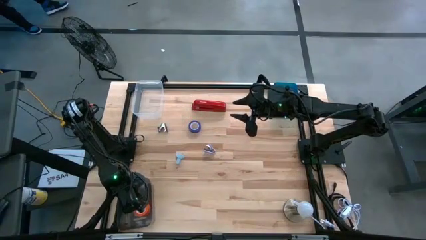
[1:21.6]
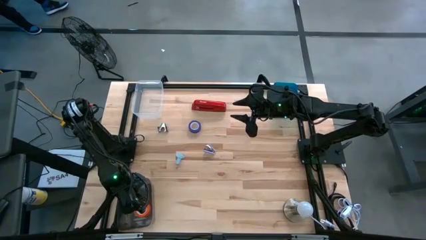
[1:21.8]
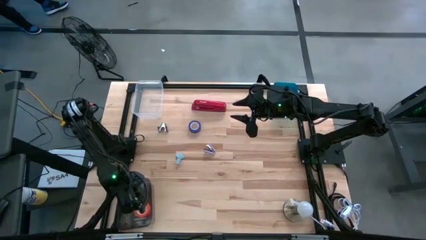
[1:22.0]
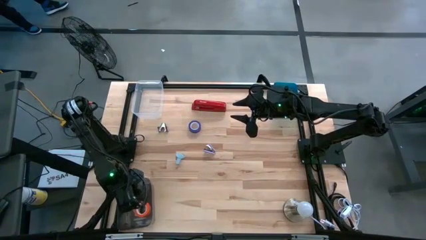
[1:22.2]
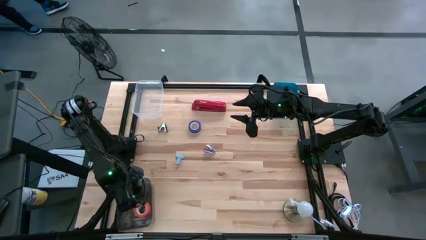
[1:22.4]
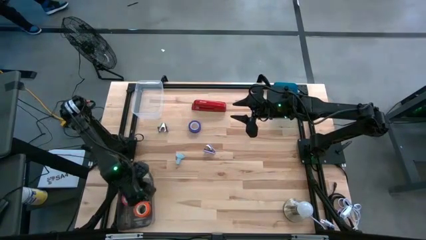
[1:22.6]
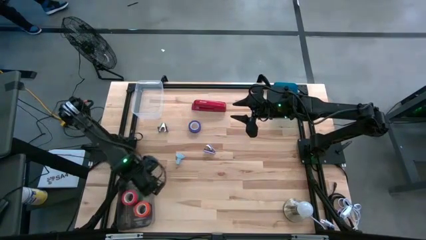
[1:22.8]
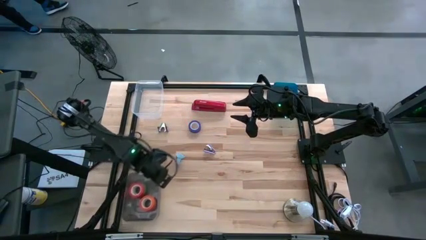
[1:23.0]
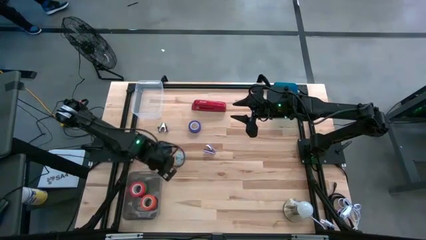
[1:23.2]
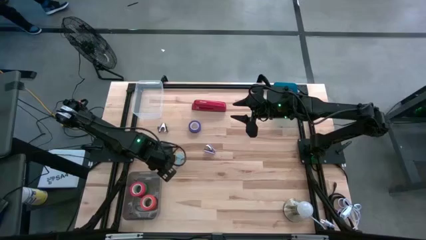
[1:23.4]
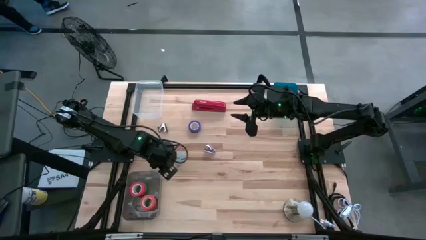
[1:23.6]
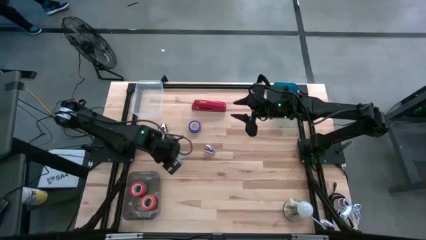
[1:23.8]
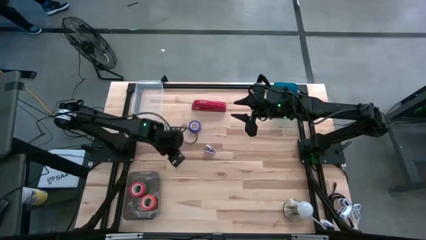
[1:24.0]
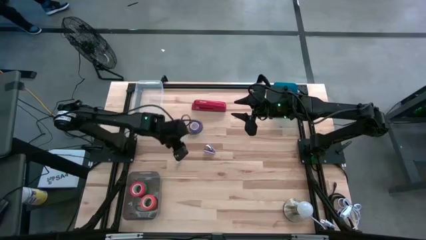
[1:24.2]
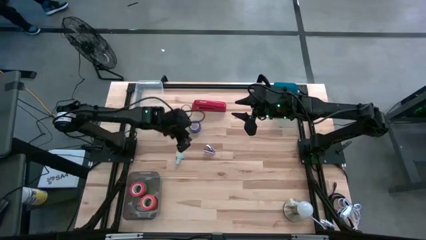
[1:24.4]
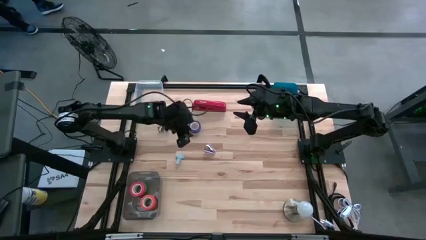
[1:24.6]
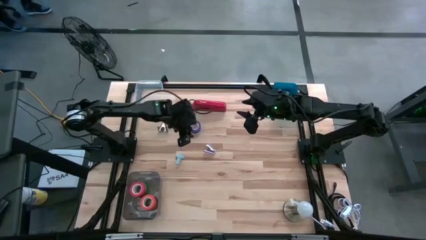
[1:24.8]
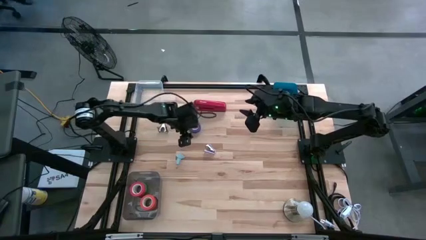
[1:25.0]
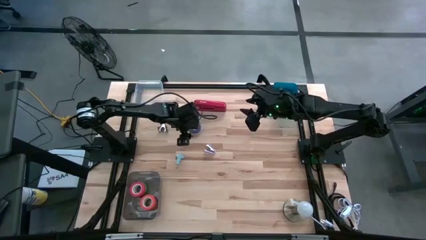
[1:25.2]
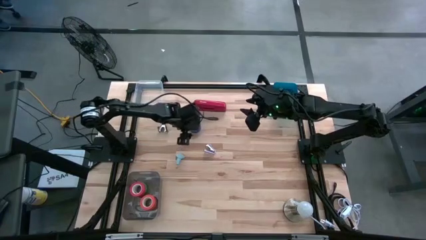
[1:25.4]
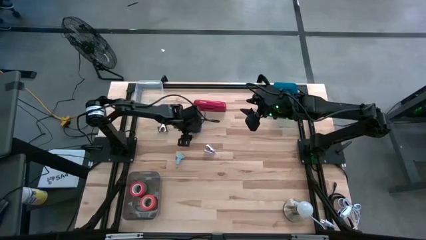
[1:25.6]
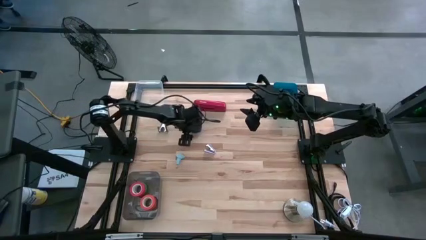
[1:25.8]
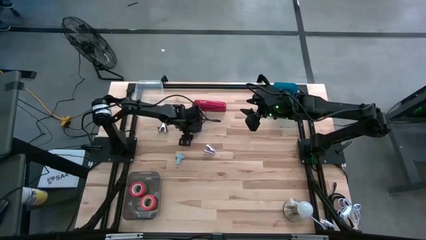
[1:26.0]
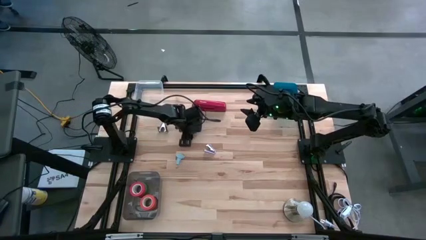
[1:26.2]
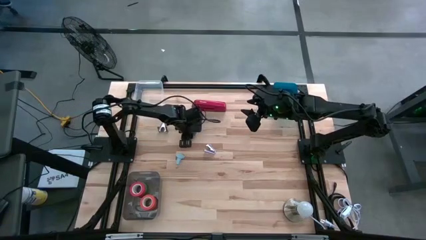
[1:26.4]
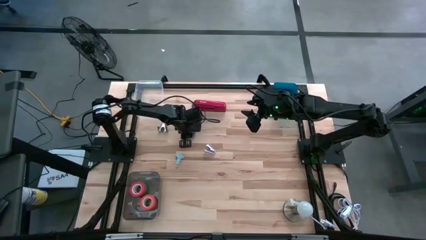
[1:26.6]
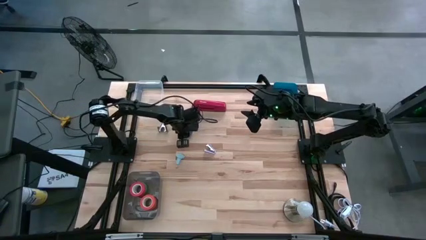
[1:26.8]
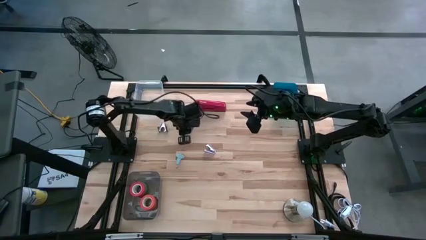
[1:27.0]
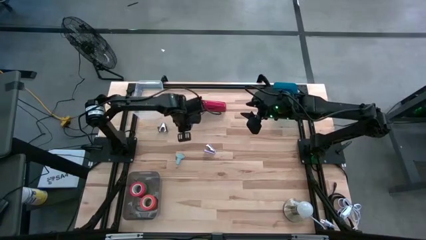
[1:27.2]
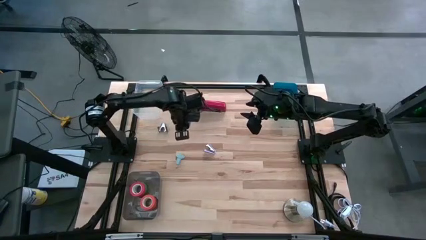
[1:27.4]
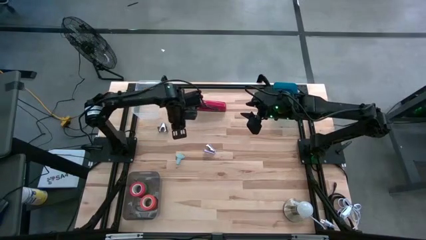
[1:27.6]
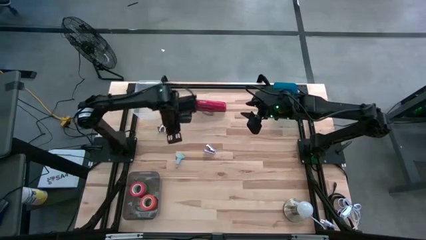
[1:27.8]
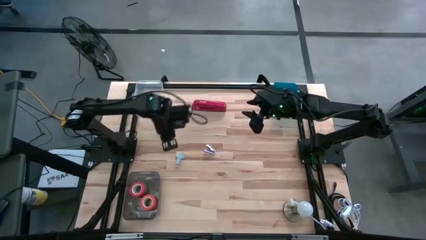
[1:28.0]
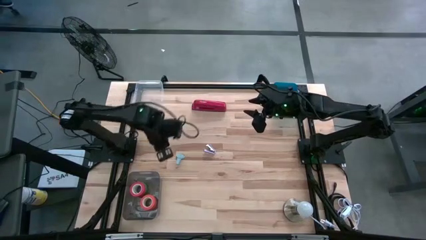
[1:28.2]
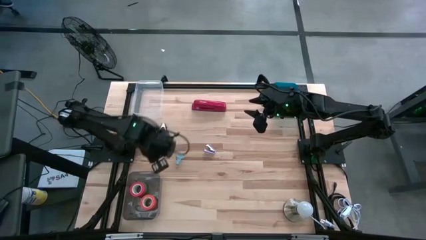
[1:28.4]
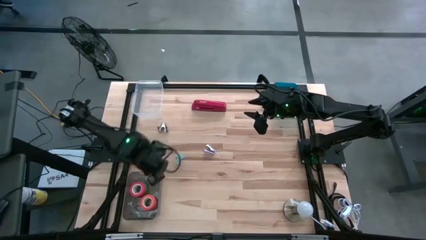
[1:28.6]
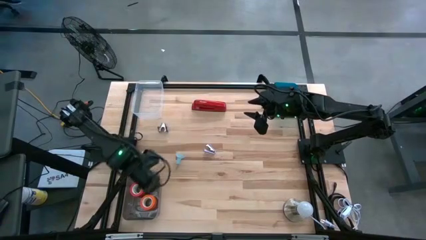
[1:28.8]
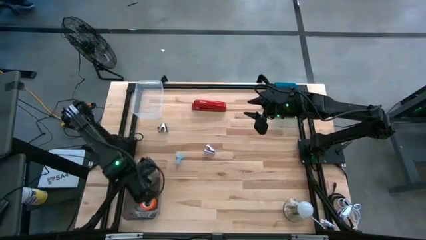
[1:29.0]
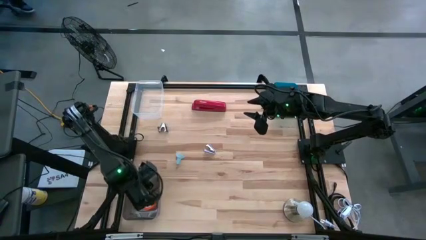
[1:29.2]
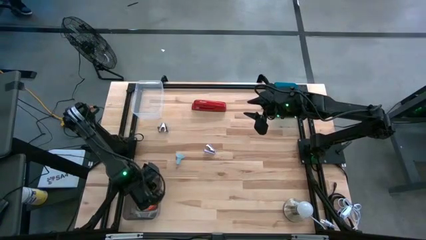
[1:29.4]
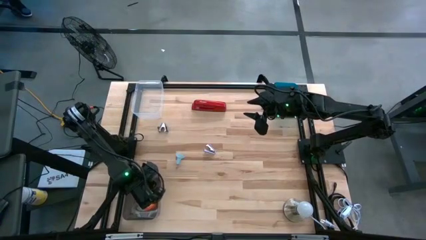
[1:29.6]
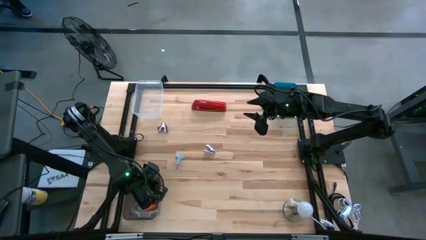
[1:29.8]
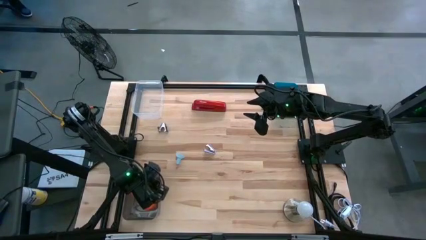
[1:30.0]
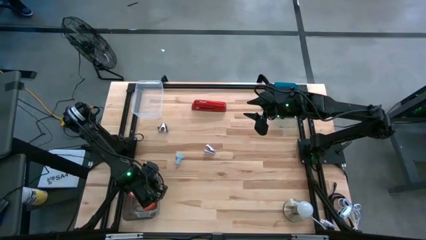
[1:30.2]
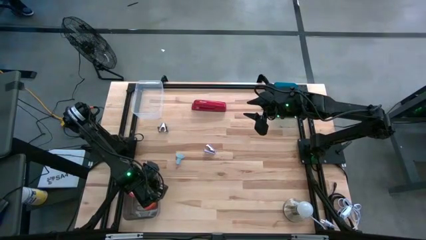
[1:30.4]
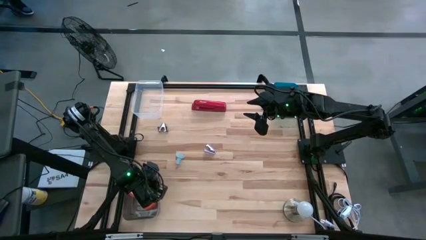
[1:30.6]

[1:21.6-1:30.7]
Task: Pick and place Stapler, Stapler remover, tape
Put the blue tape into the black bin
